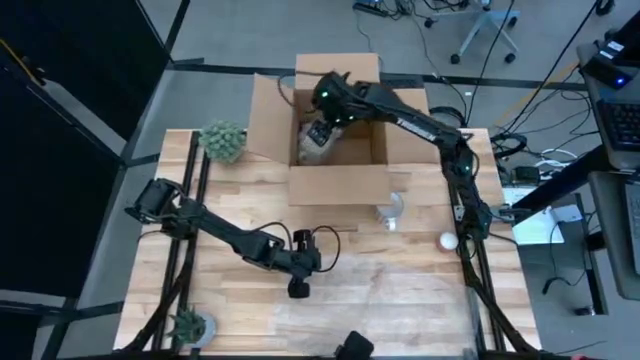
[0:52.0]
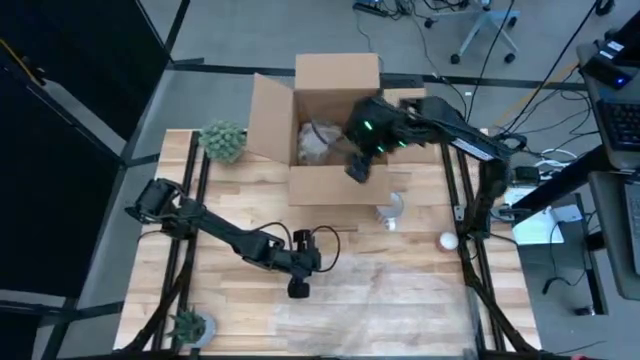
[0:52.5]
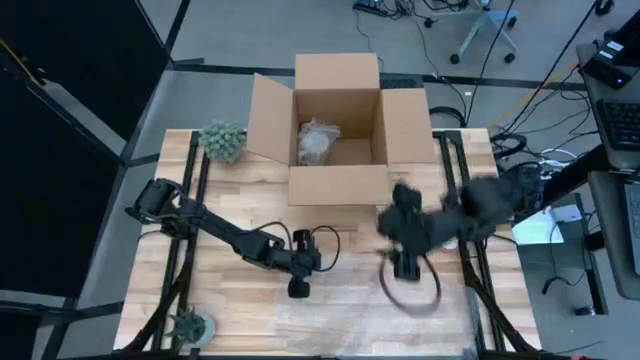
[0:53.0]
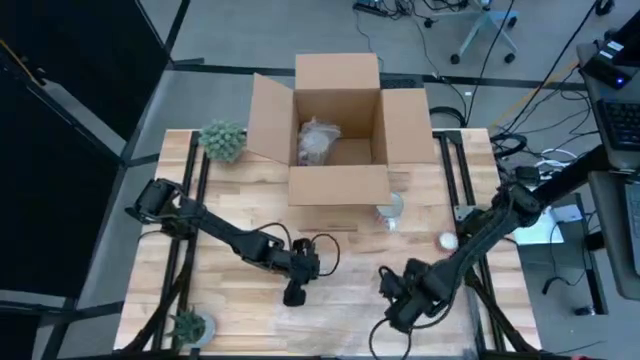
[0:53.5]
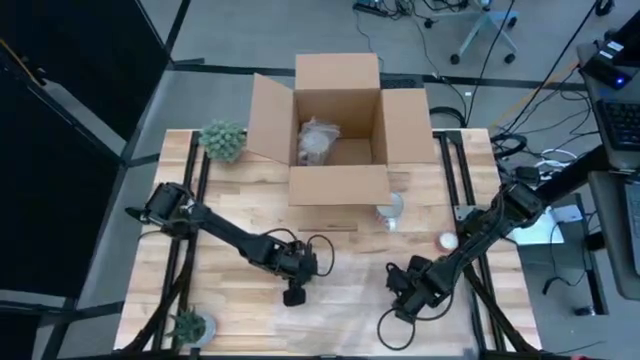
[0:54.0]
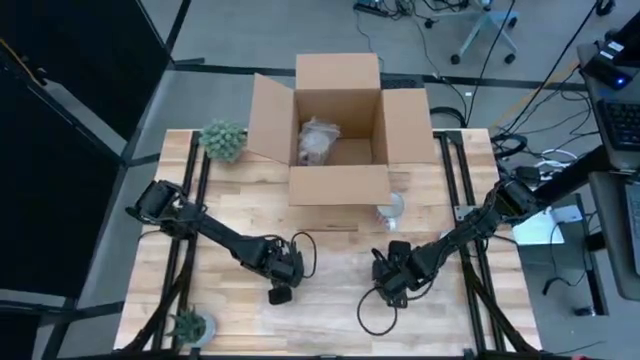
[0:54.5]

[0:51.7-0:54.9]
Task: wrap mug
Adjust the bubble wrap

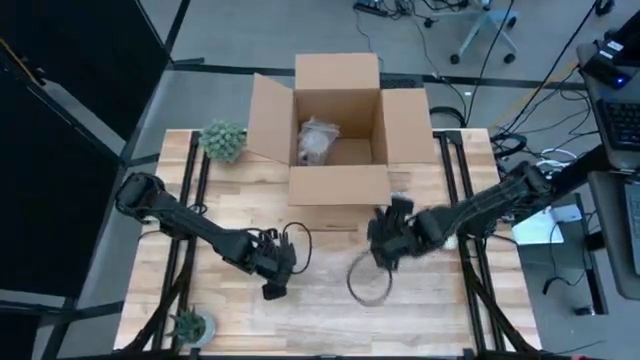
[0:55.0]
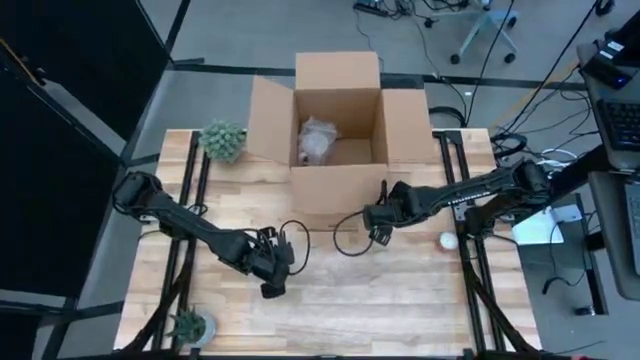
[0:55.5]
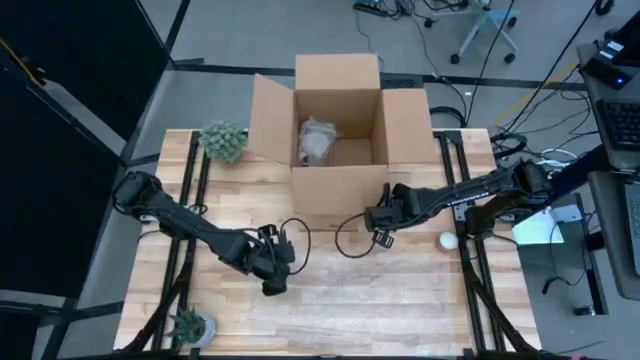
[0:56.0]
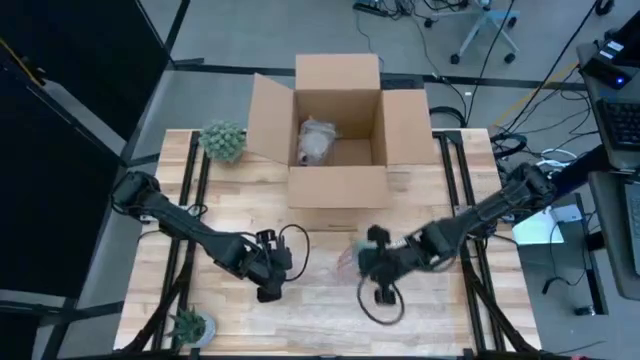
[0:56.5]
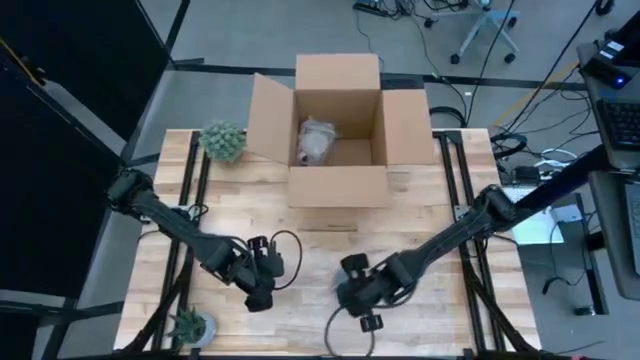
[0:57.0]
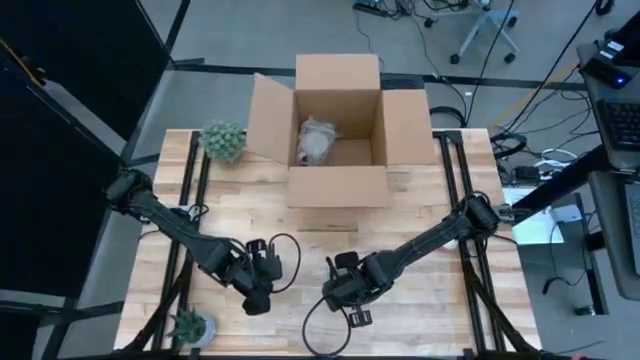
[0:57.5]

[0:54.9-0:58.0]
Put the red mug on the bubble wrap

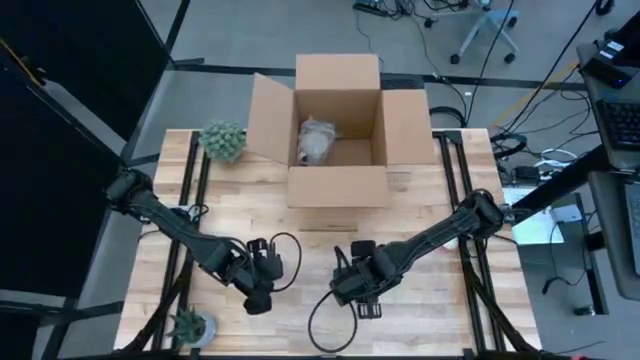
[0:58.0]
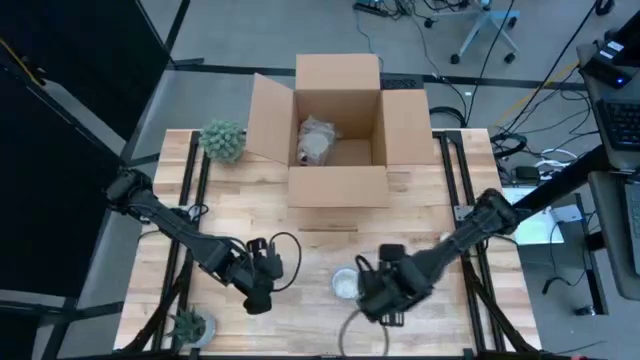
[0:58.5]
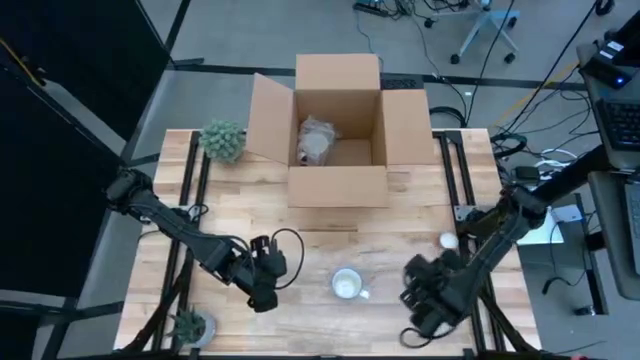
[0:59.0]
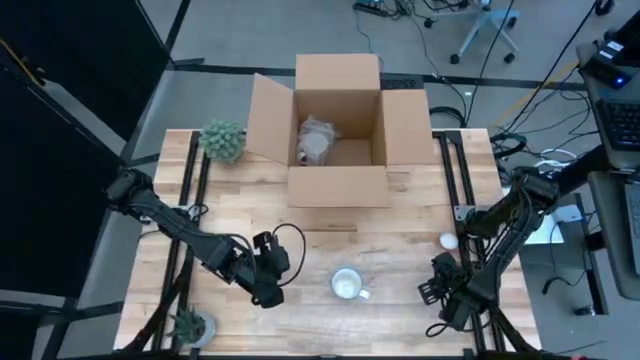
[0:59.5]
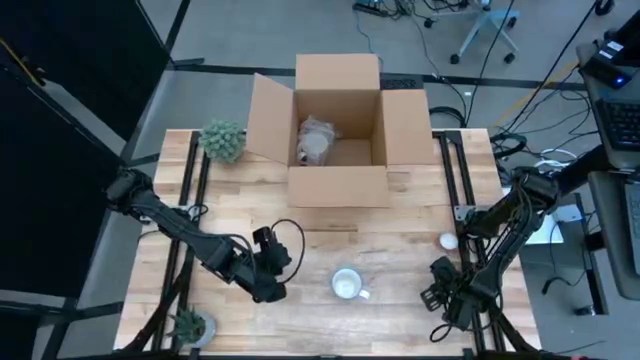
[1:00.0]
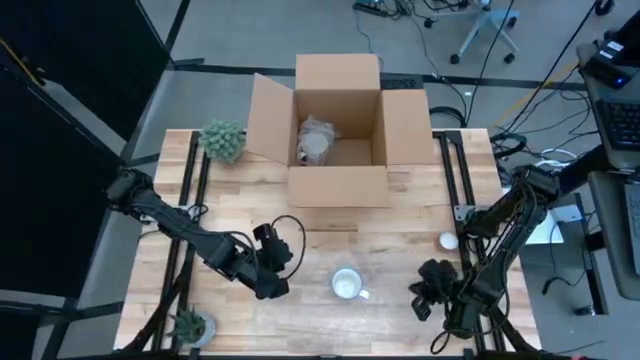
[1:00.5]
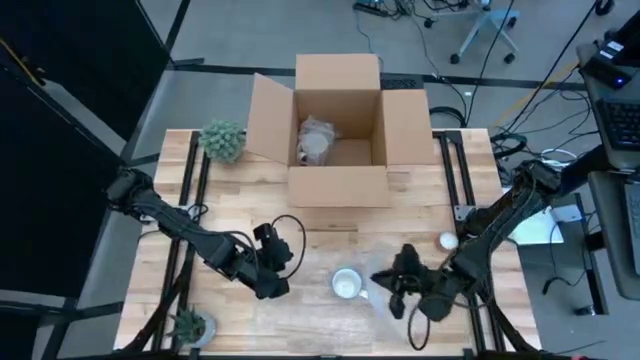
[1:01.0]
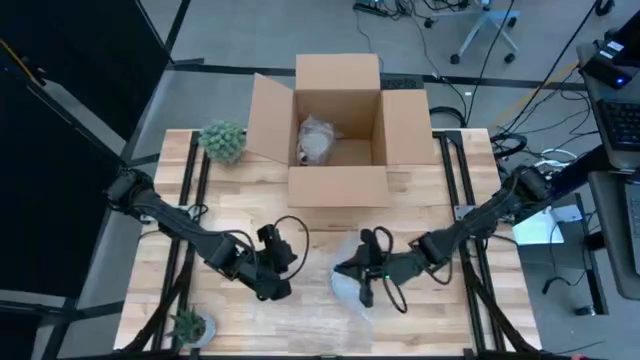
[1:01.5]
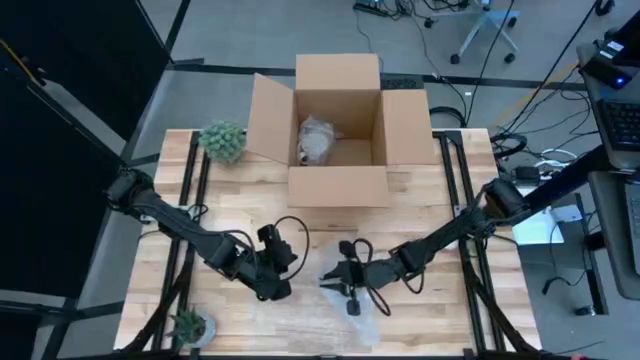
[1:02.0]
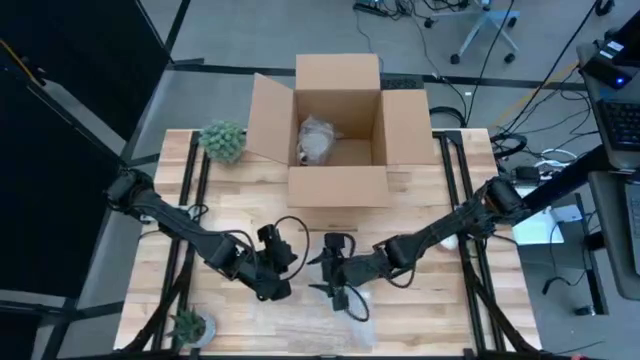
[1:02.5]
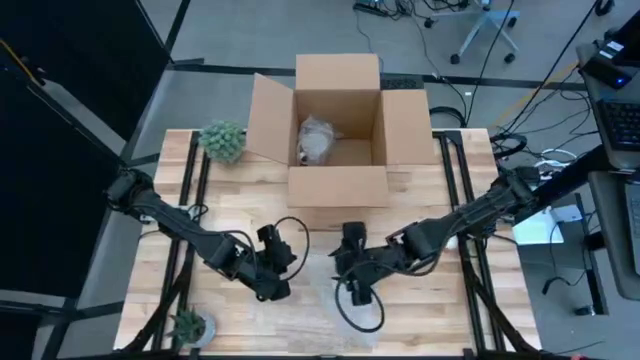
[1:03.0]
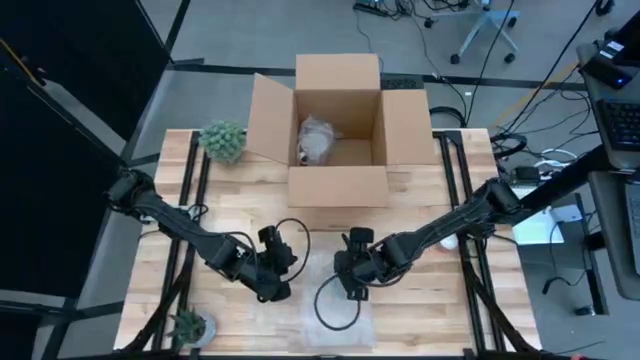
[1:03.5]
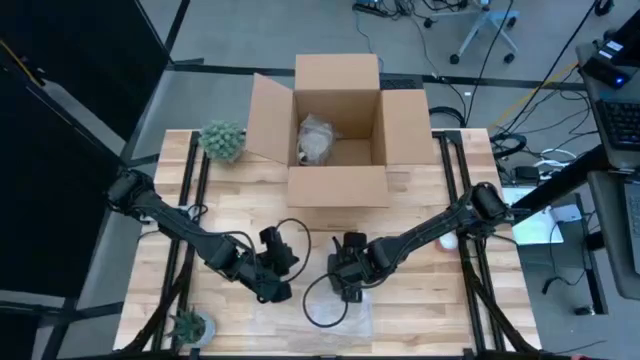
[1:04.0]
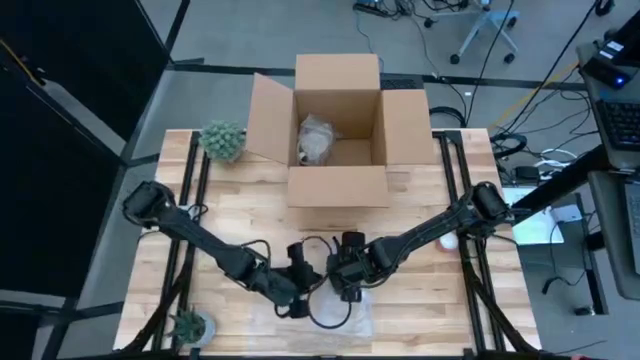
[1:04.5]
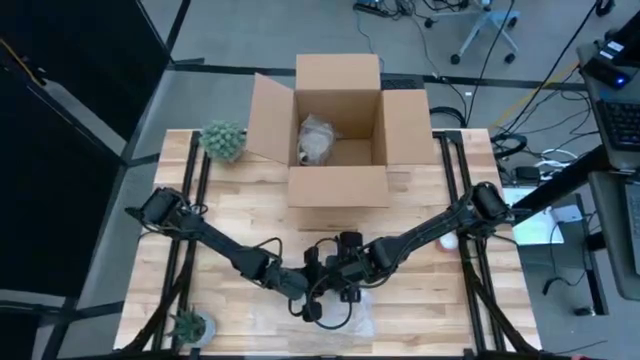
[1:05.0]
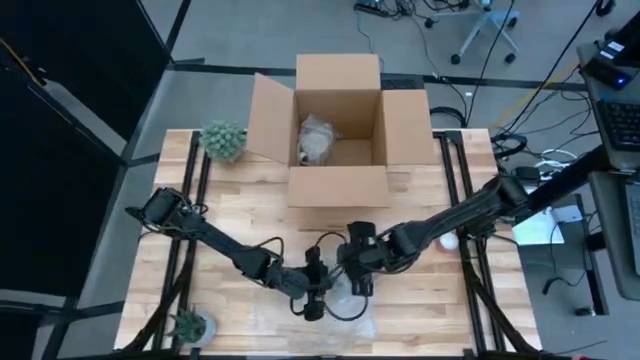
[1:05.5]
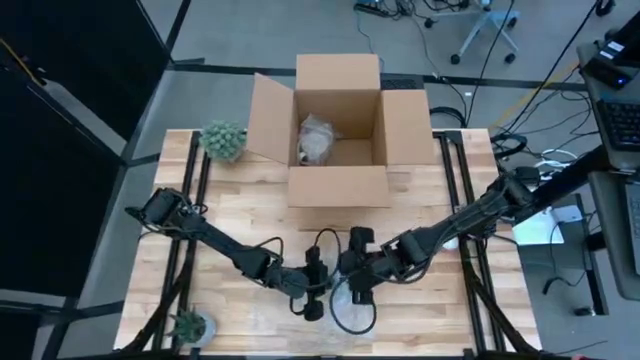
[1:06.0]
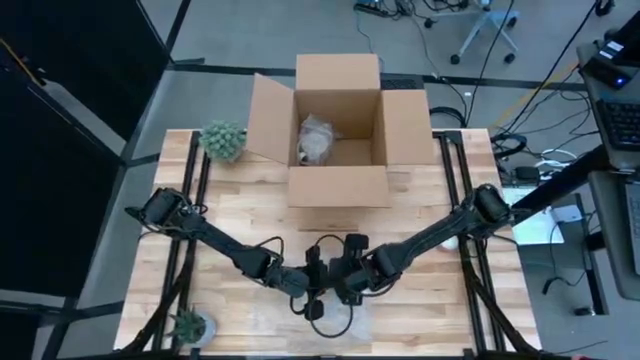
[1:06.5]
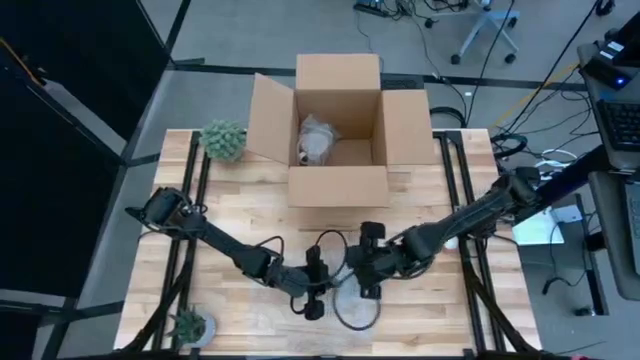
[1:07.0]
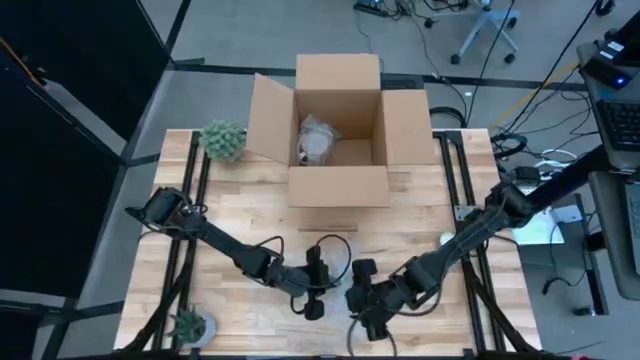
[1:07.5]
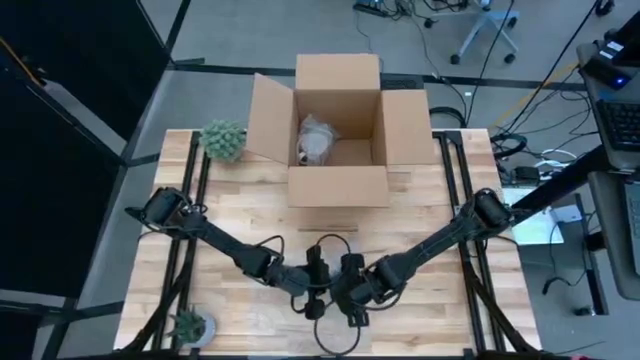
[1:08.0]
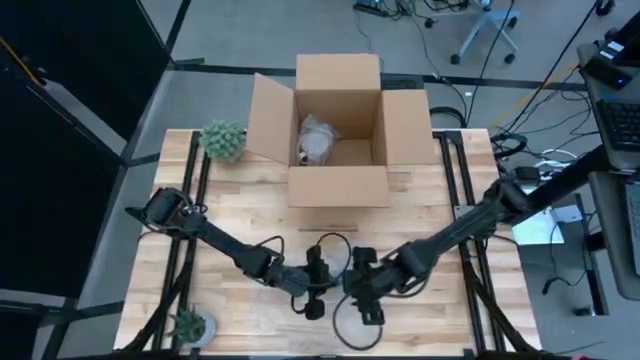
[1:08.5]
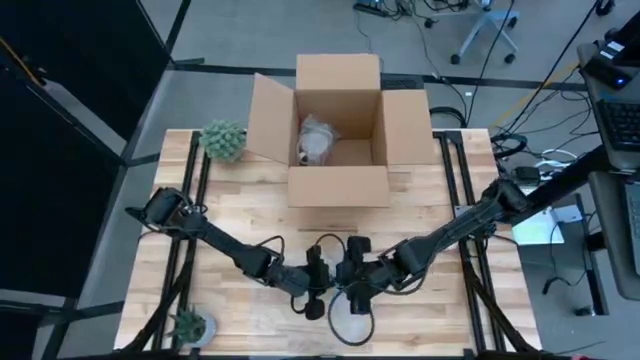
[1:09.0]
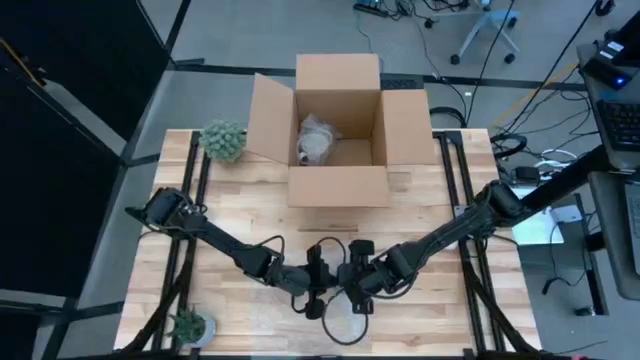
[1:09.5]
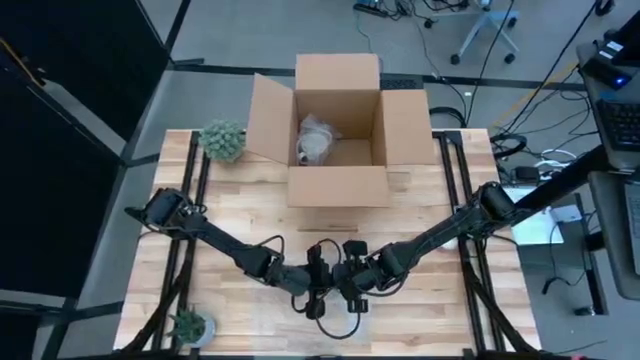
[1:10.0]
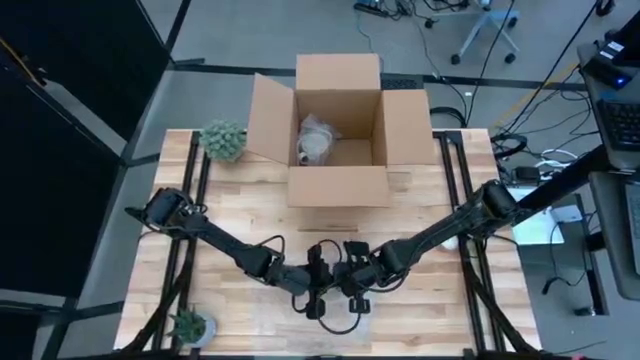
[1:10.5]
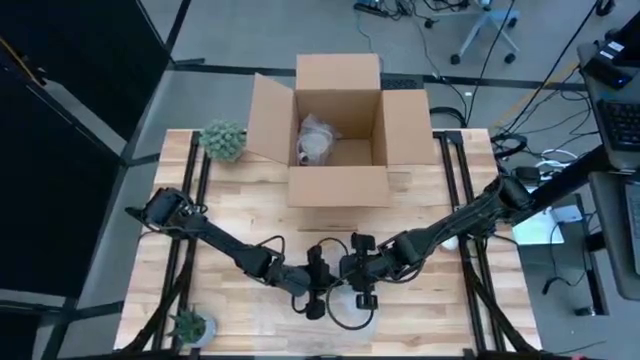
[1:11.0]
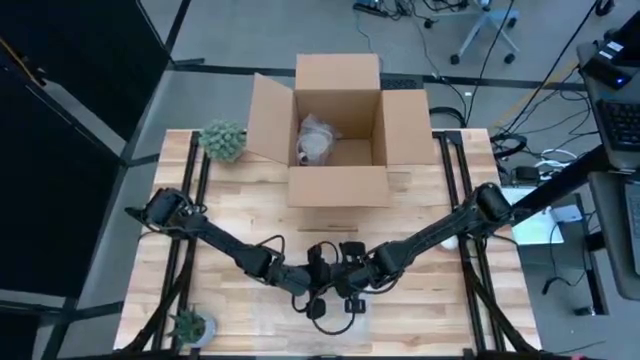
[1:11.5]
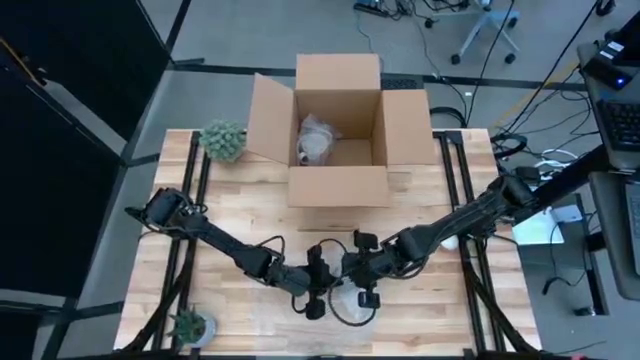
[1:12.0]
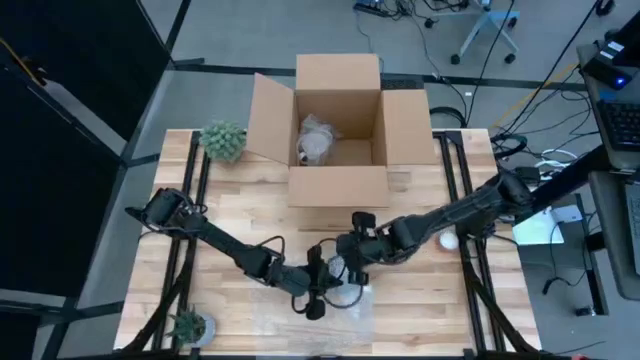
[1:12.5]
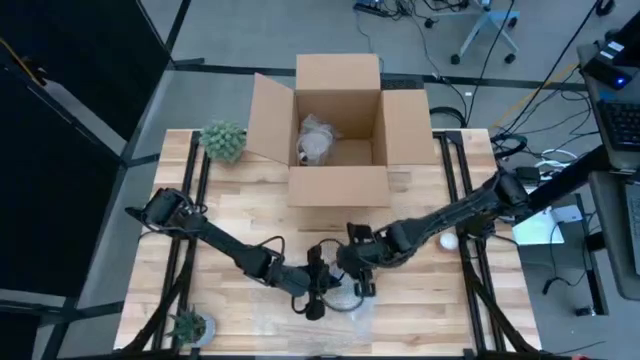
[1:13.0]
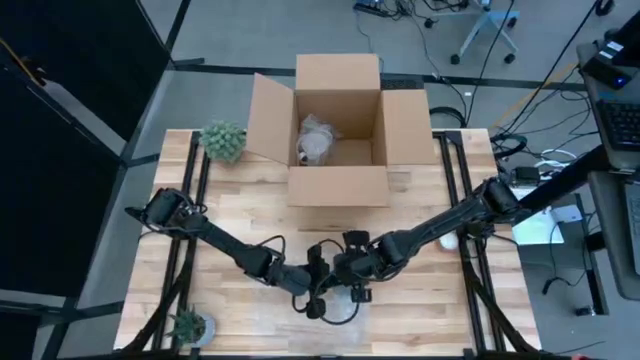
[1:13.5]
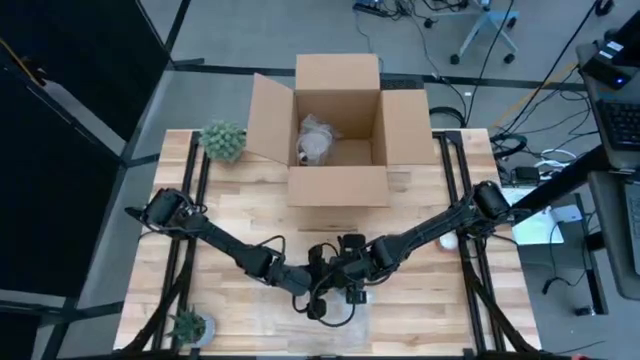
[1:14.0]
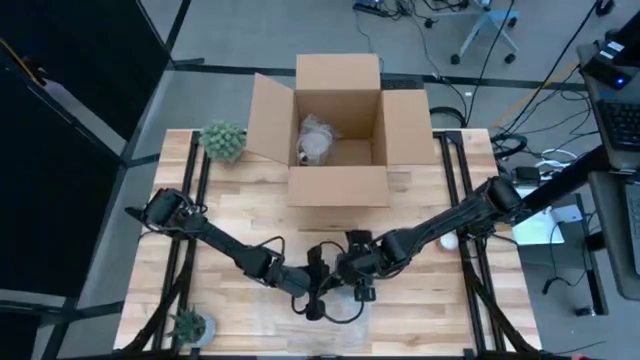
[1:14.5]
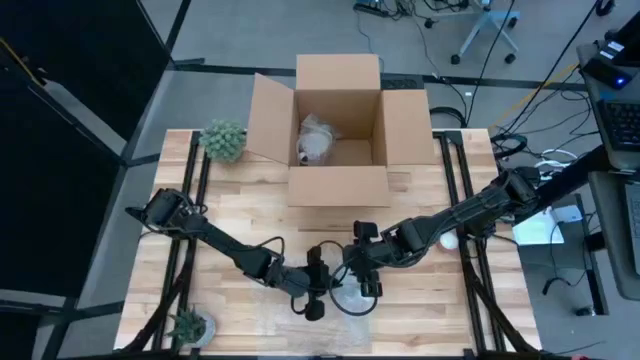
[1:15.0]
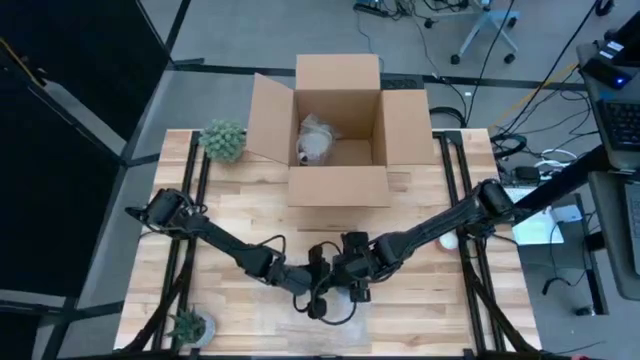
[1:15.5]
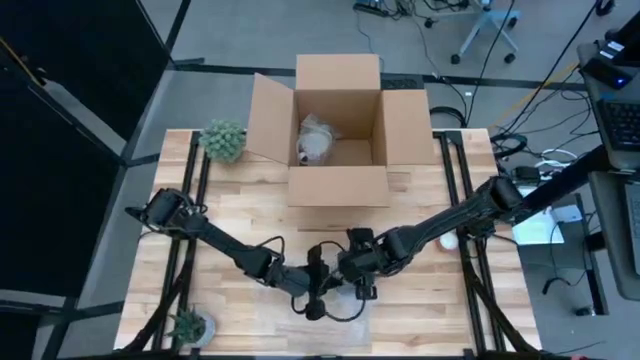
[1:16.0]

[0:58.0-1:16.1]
Wrap the red mug with the bubble wrap
